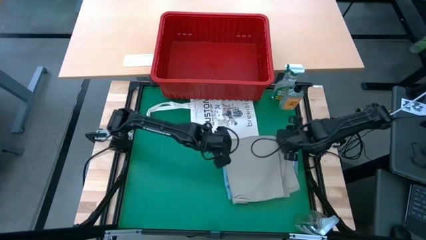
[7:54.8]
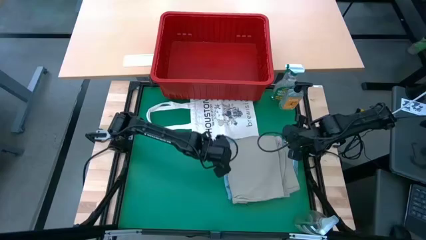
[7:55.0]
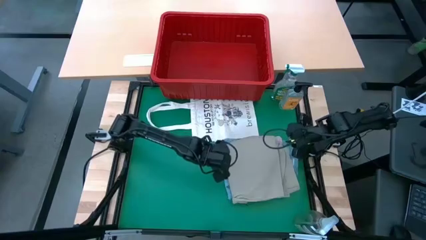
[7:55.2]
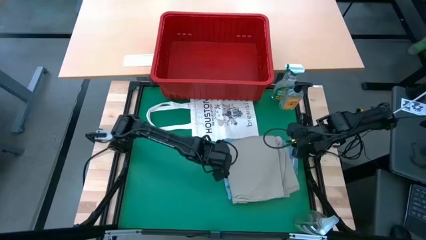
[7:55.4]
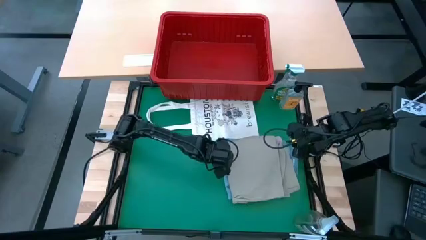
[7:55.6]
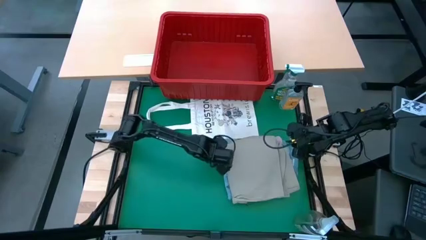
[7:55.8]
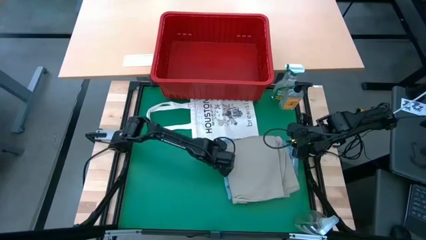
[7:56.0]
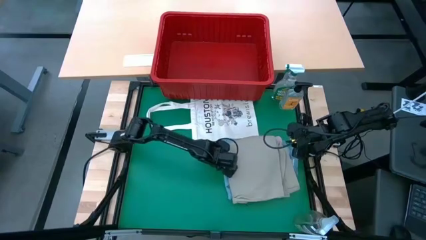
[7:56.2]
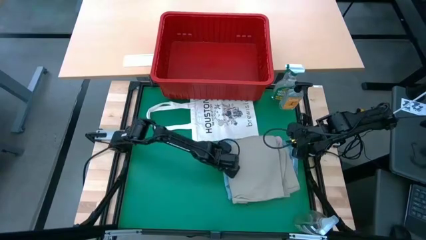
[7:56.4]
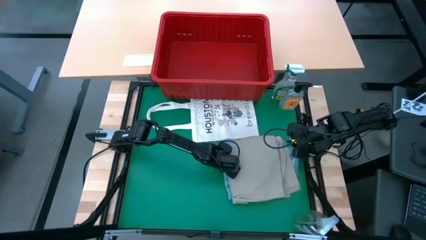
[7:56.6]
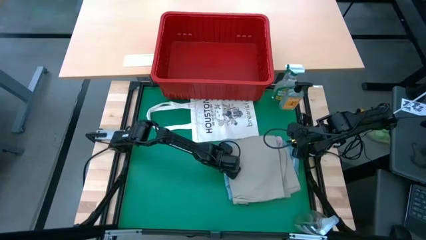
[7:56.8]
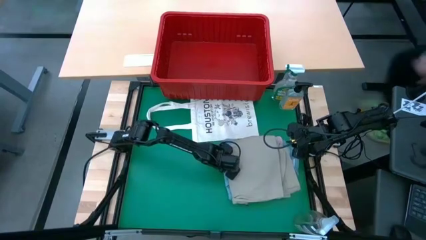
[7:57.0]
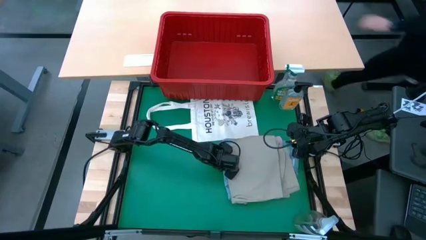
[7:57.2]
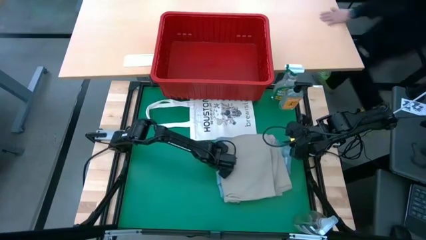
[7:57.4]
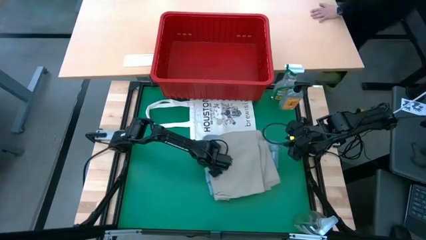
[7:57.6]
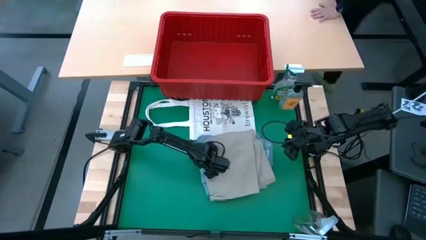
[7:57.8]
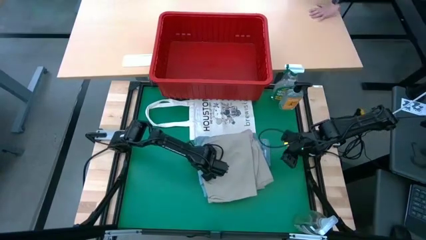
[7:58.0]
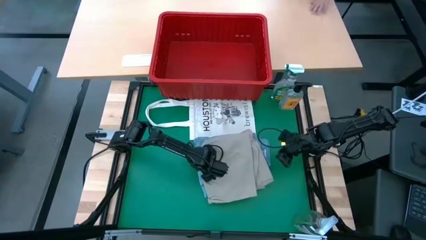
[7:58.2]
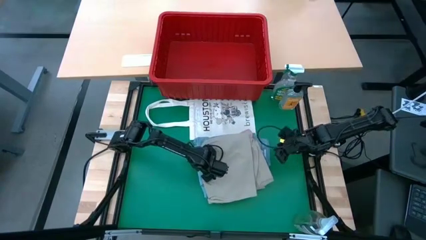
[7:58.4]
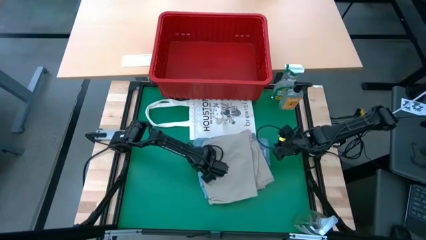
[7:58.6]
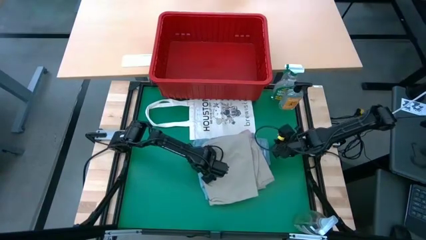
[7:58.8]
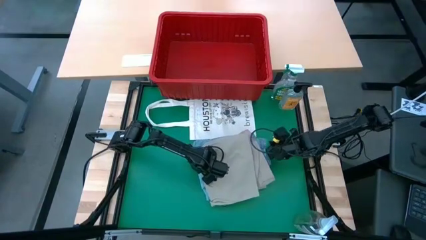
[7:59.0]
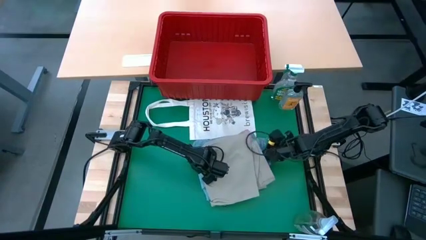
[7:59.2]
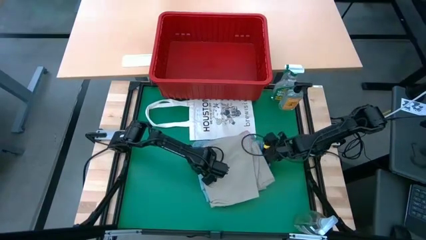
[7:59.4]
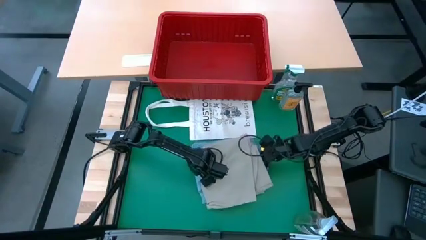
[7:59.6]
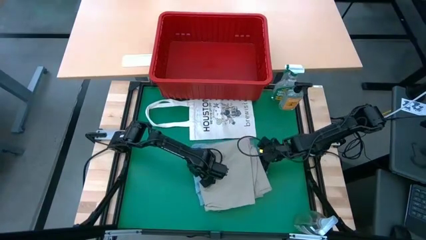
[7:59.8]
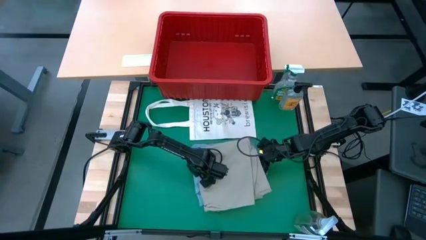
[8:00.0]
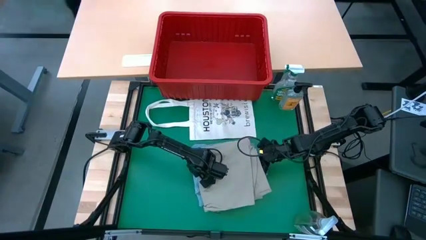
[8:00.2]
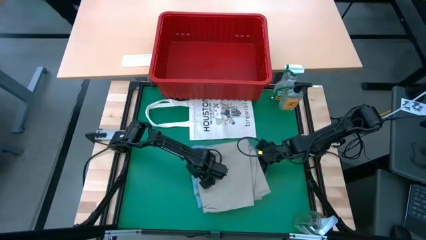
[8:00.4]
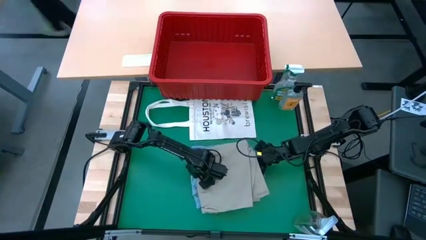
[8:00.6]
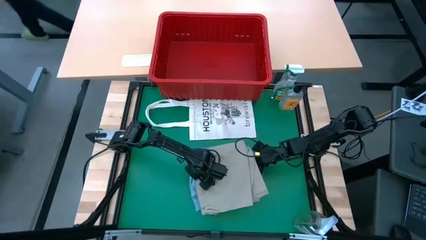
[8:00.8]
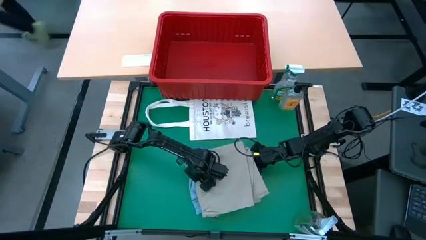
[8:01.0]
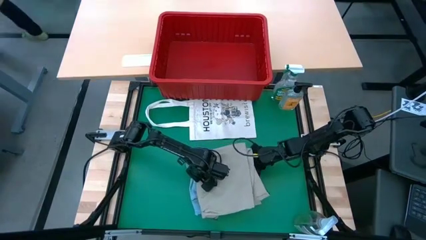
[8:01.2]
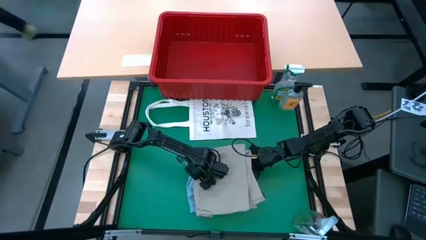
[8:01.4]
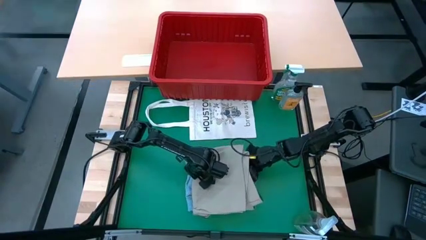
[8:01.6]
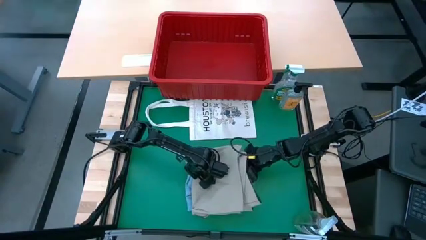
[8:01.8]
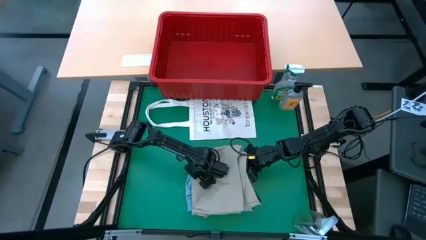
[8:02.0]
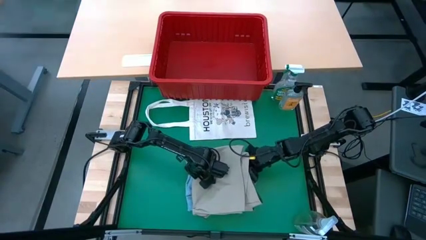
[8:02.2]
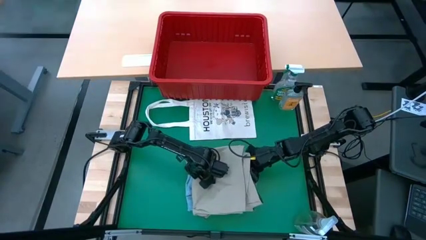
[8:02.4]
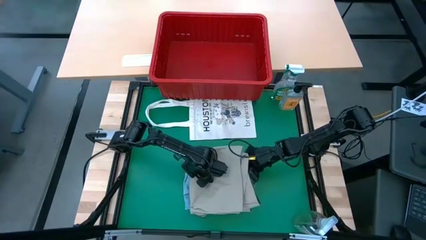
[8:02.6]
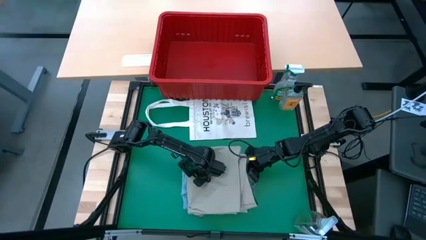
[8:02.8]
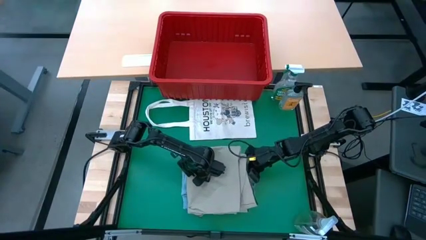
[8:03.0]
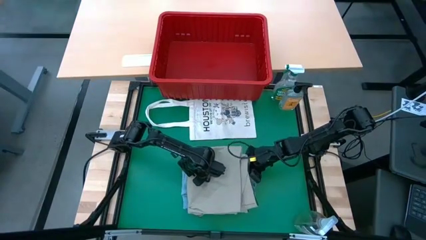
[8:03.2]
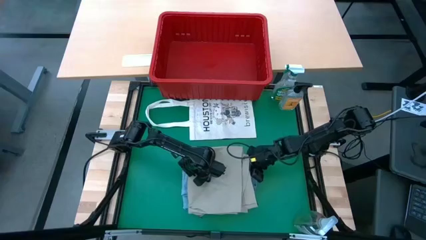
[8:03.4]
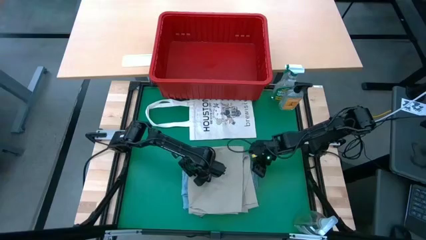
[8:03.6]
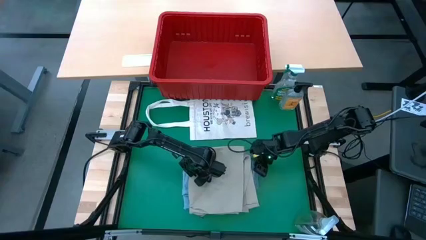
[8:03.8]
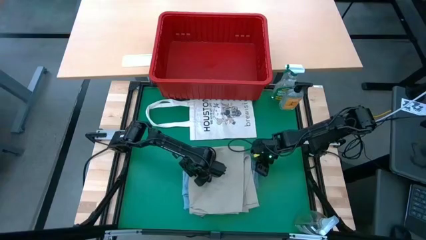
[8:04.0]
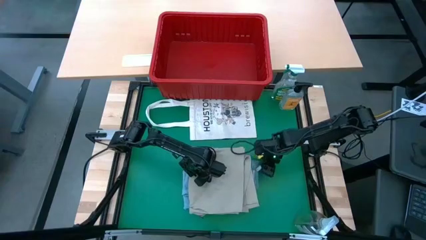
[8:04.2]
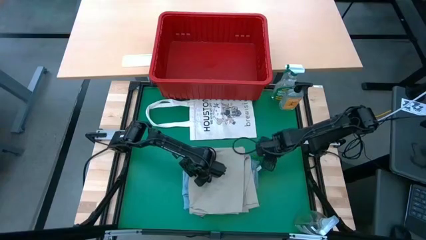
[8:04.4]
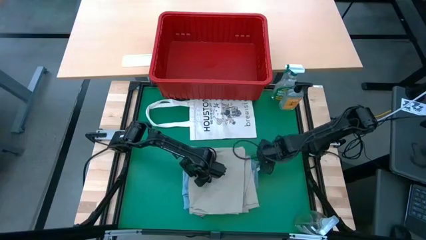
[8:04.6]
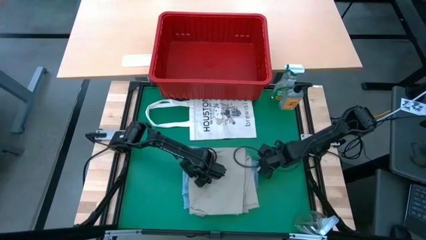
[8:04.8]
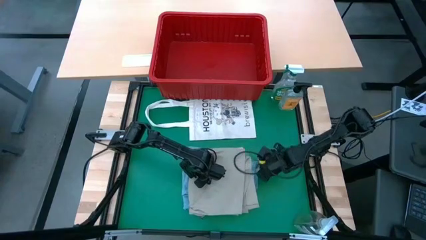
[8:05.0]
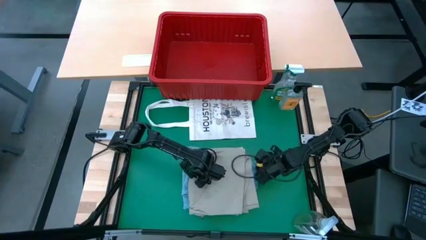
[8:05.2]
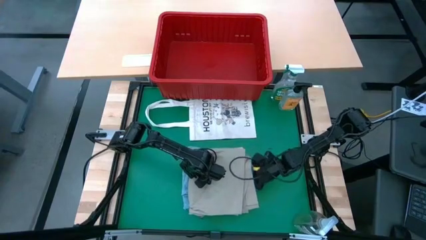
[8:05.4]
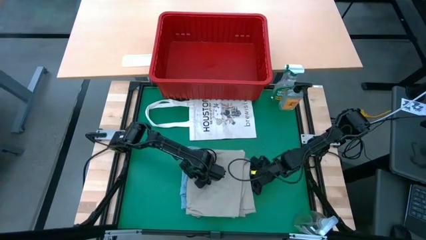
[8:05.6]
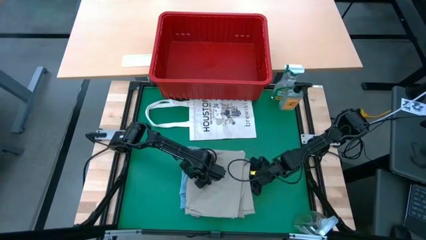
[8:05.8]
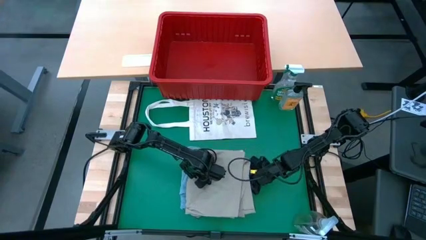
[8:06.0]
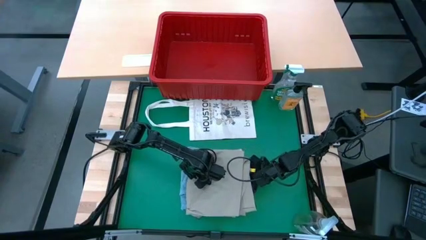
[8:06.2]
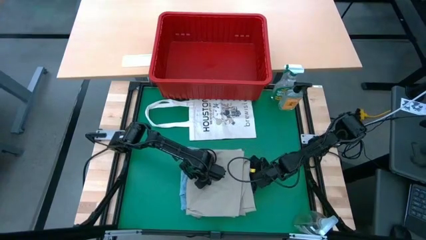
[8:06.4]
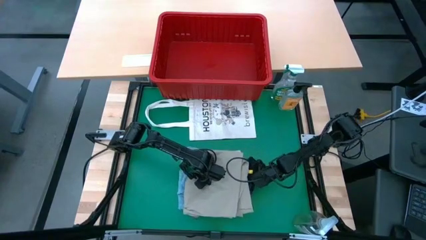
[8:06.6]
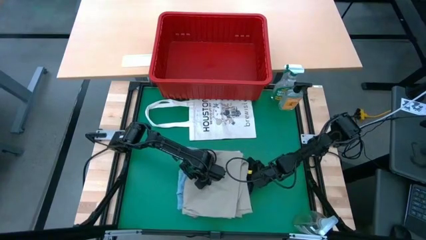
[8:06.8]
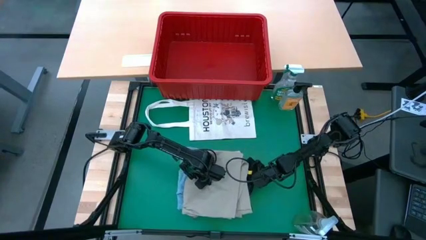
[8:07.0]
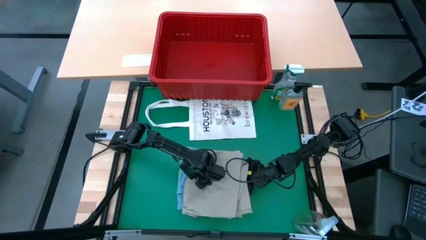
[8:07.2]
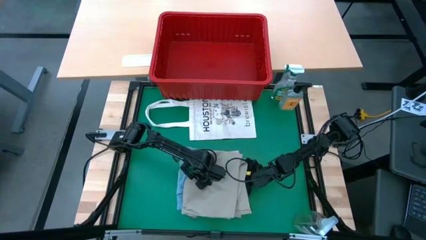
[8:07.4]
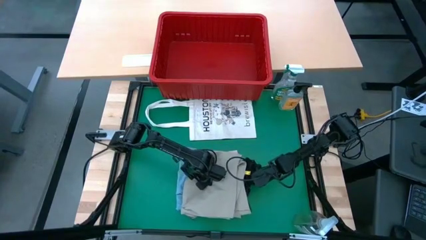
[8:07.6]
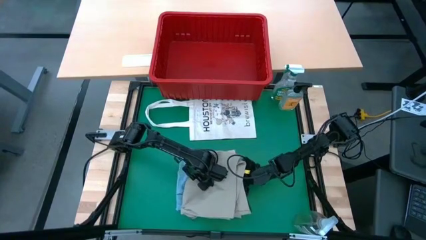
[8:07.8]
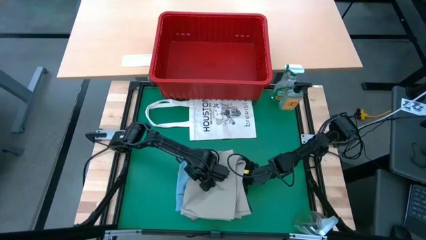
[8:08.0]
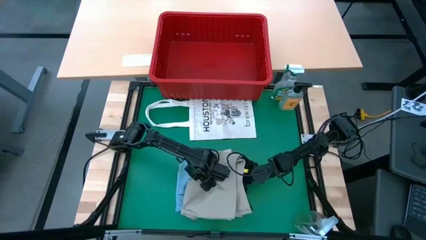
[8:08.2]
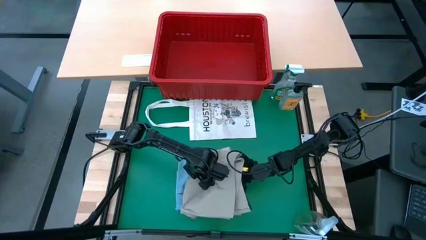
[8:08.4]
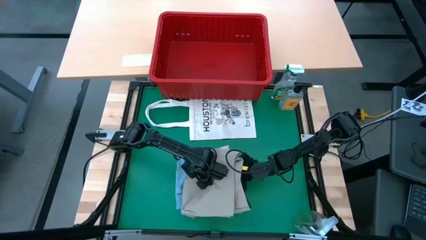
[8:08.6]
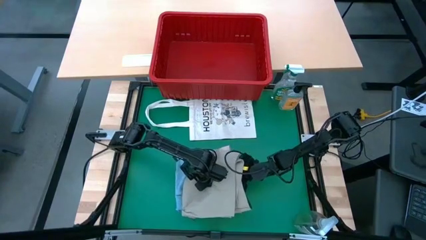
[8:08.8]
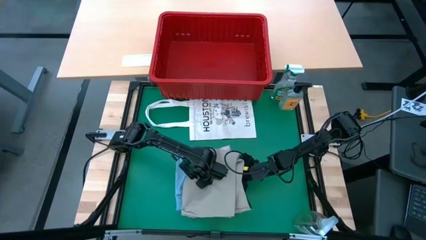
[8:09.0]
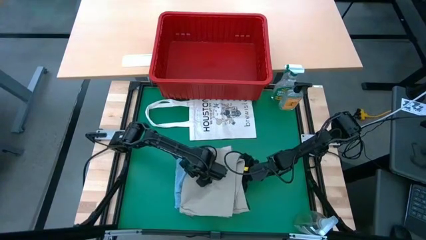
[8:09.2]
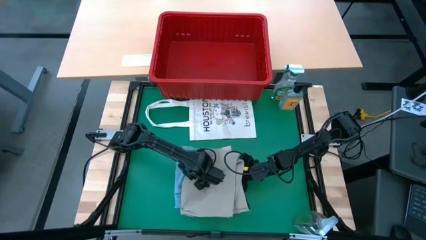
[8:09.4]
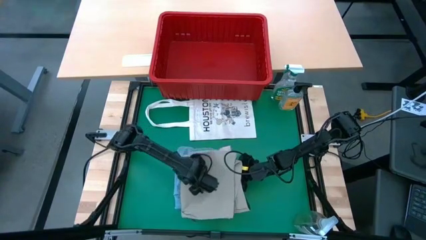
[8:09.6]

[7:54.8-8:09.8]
Task: Fold Laundry from Bin
Put the folded clothes into the red laundry bin
